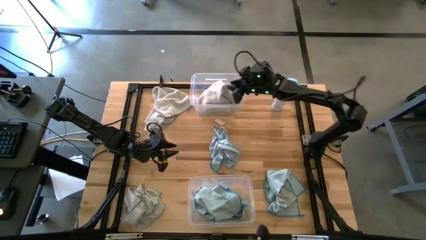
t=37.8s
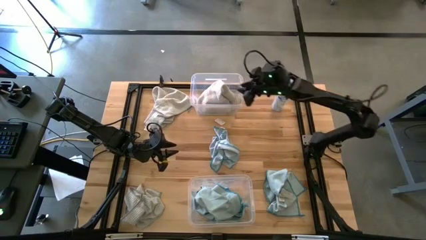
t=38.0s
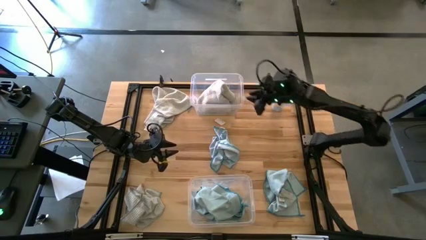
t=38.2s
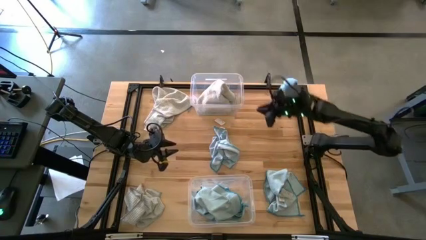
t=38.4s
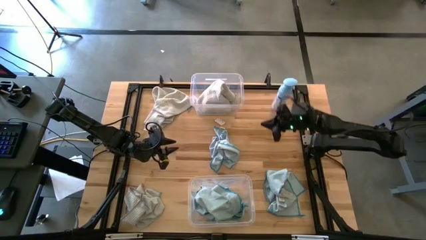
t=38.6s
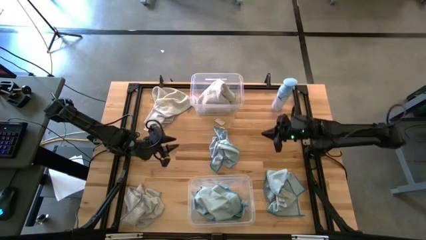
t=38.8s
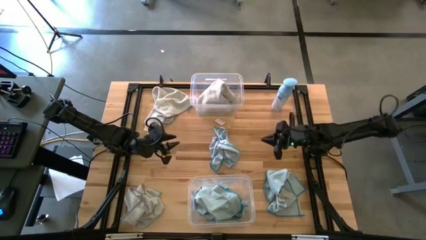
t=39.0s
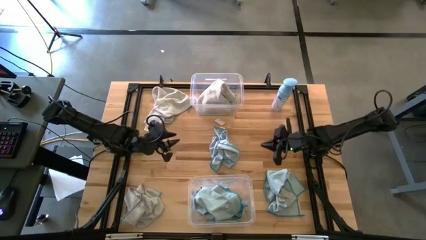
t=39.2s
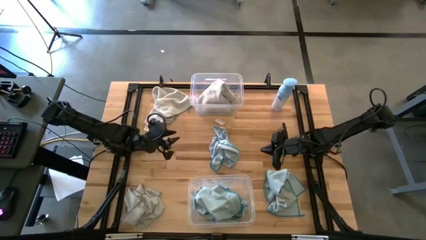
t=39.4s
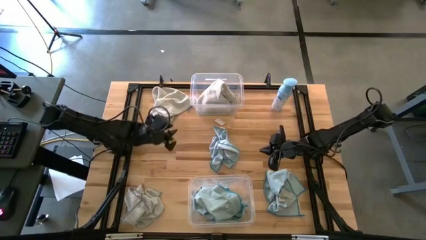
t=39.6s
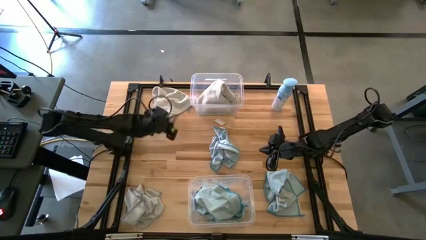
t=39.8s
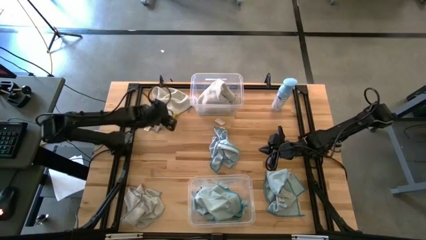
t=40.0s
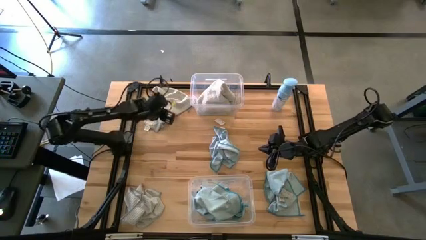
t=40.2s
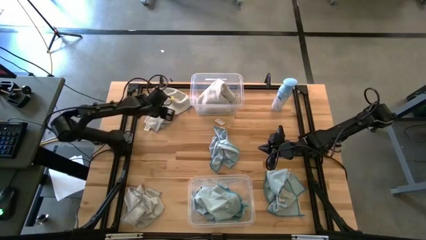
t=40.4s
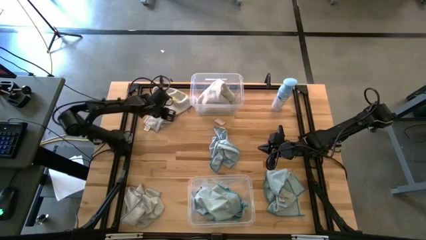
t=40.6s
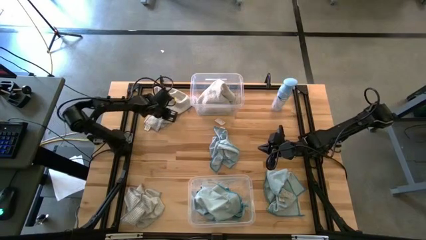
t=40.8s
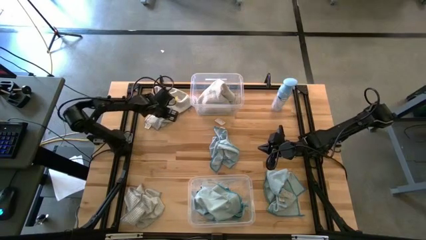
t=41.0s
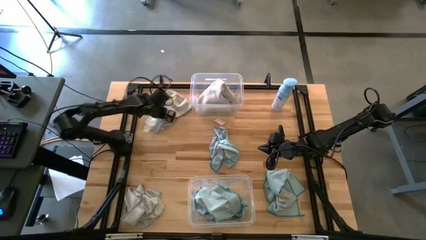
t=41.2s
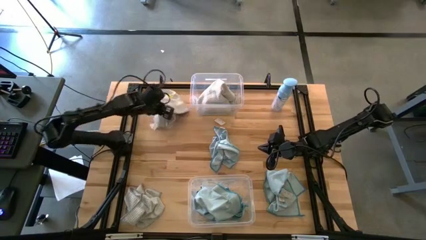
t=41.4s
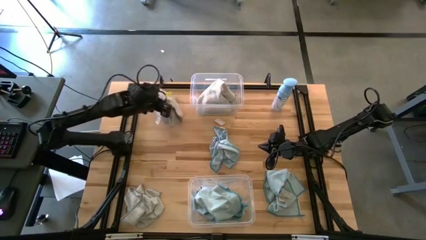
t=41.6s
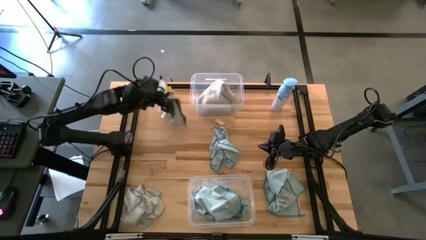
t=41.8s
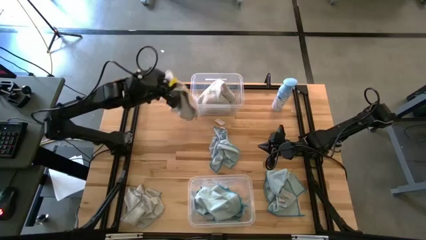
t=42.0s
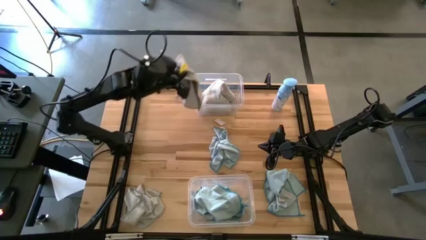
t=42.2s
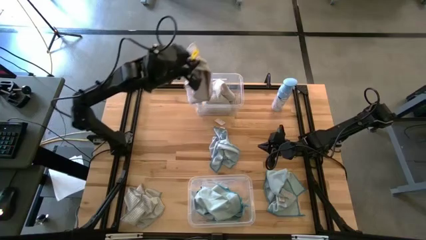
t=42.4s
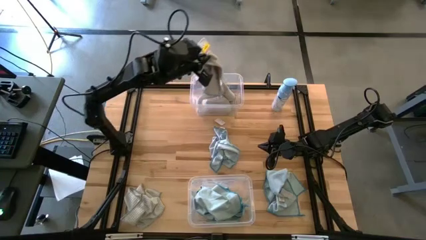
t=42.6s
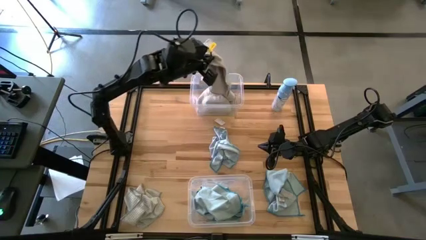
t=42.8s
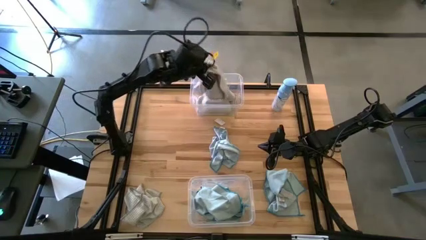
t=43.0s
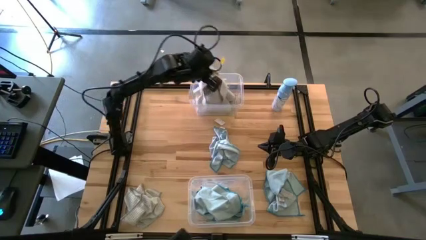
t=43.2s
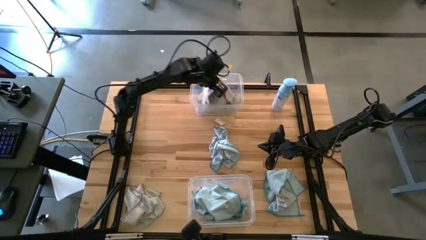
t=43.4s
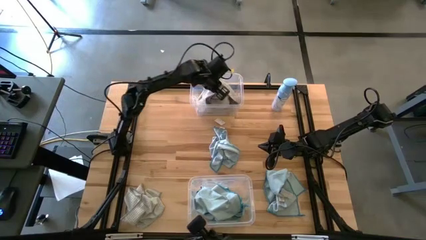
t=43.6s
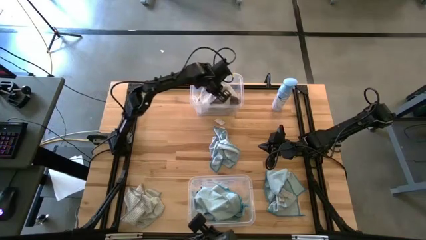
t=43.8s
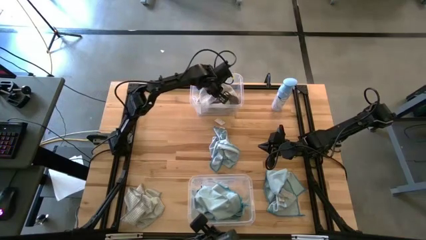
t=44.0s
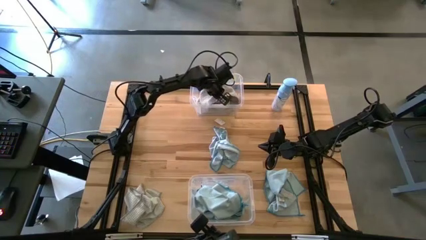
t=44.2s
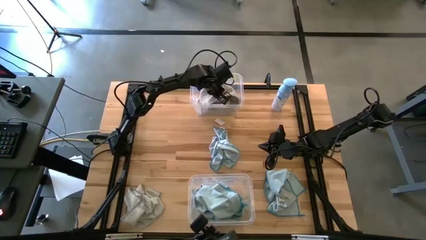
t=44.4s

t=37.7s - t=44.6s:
Task: Sort microfiber towel by color & place in baskets
Put the top white towel into the top transparent bin

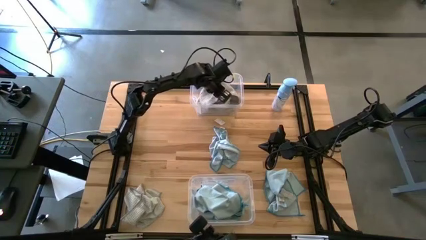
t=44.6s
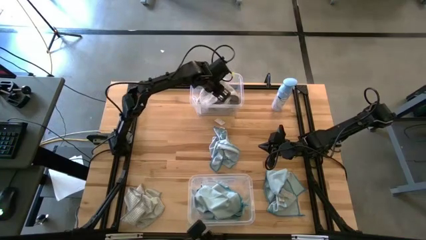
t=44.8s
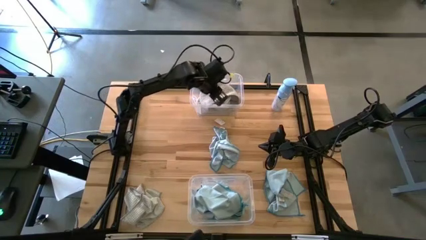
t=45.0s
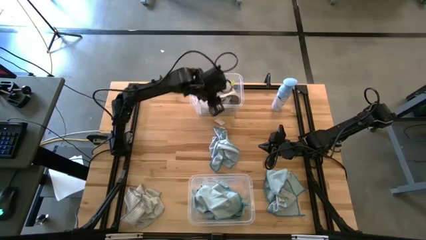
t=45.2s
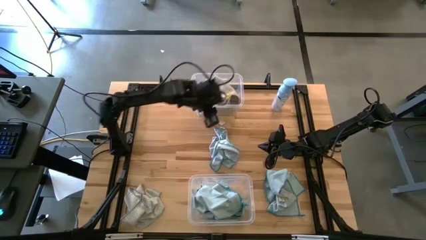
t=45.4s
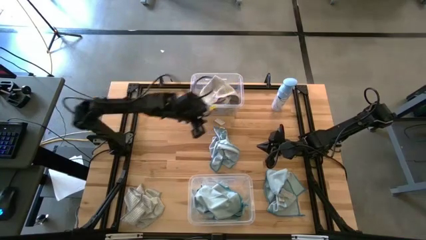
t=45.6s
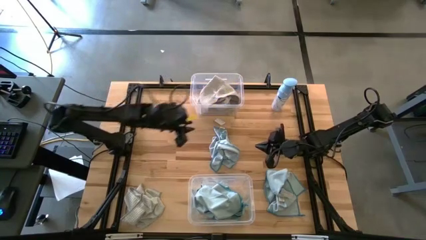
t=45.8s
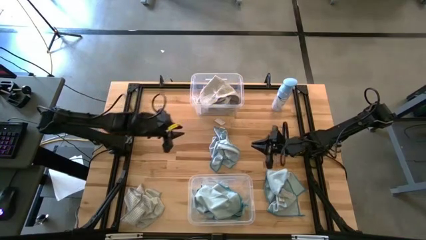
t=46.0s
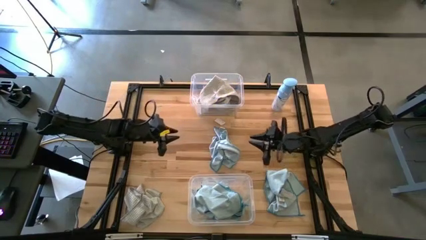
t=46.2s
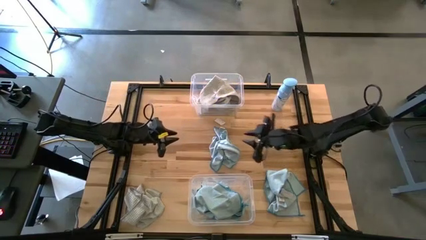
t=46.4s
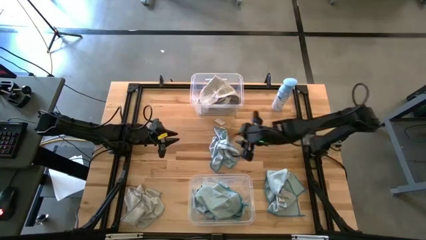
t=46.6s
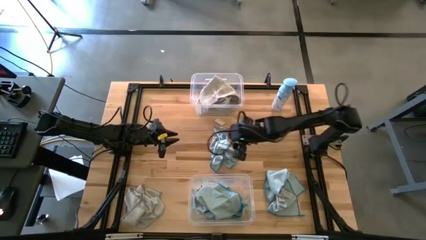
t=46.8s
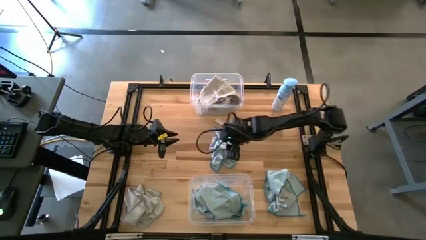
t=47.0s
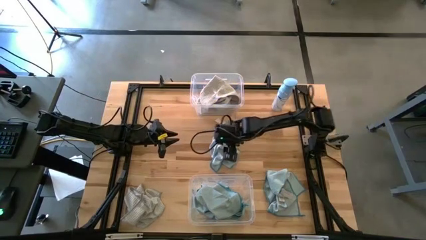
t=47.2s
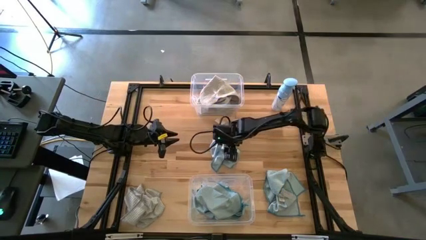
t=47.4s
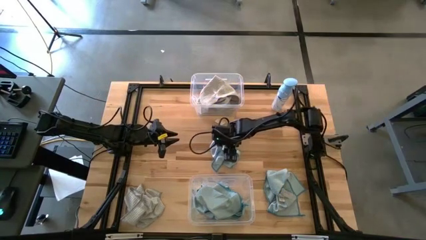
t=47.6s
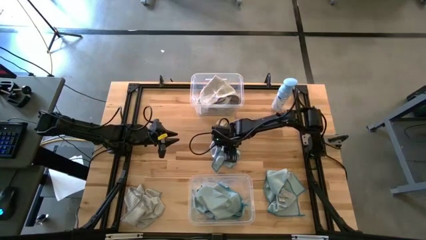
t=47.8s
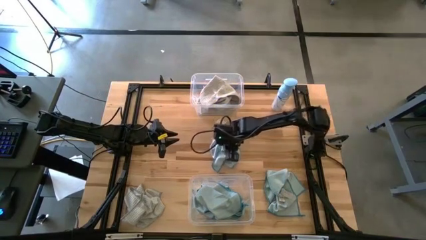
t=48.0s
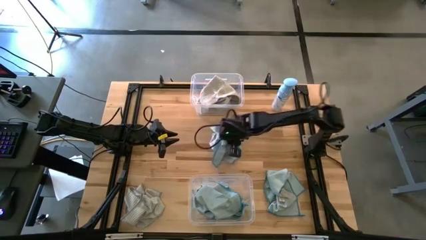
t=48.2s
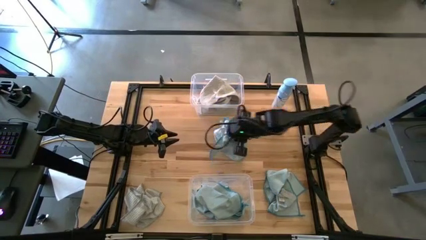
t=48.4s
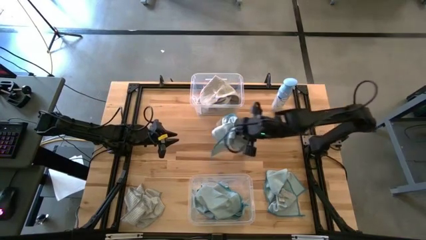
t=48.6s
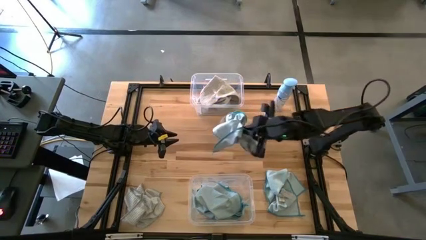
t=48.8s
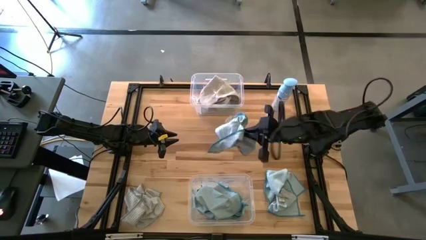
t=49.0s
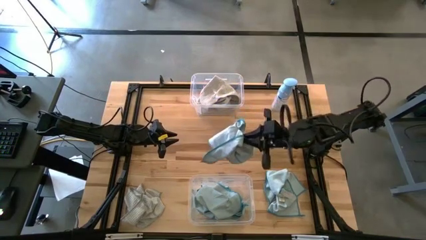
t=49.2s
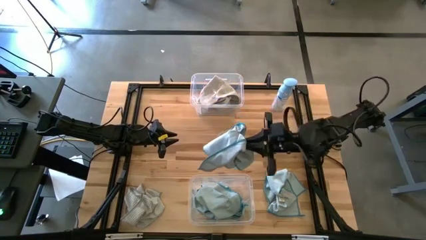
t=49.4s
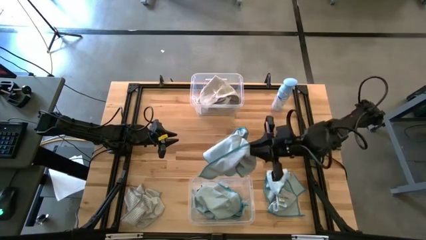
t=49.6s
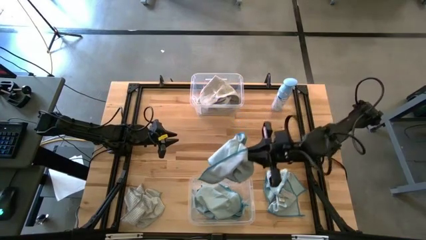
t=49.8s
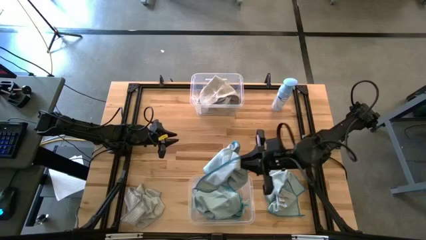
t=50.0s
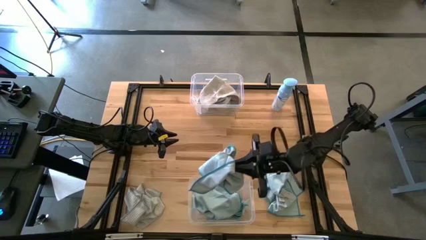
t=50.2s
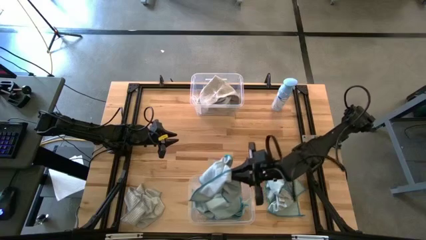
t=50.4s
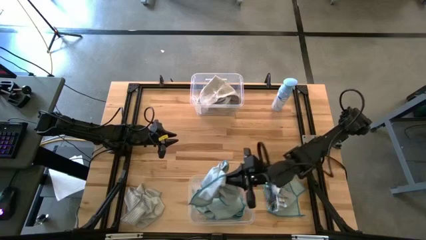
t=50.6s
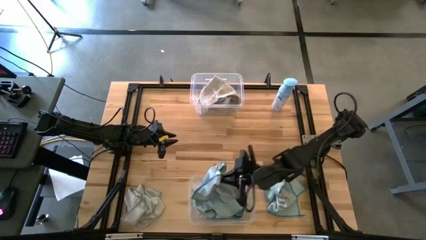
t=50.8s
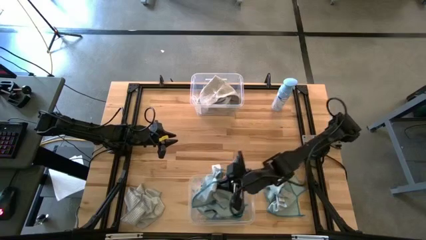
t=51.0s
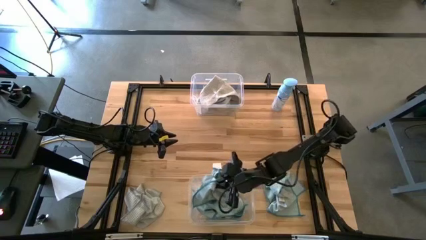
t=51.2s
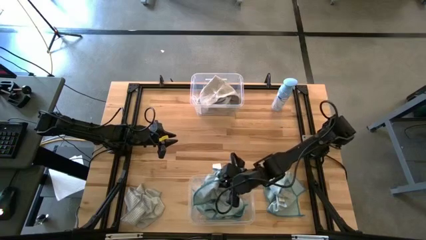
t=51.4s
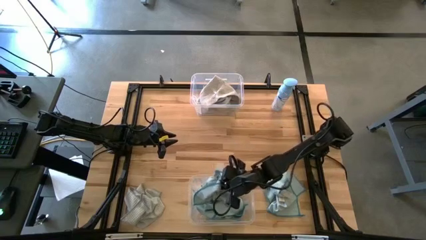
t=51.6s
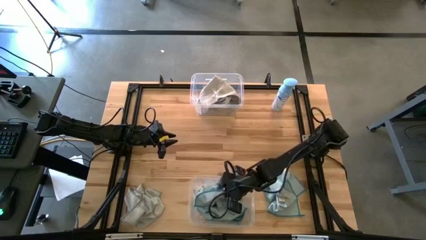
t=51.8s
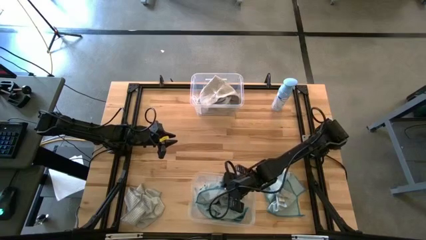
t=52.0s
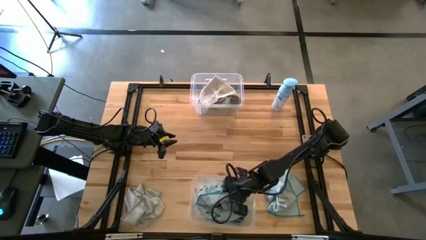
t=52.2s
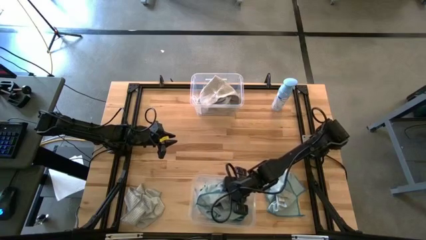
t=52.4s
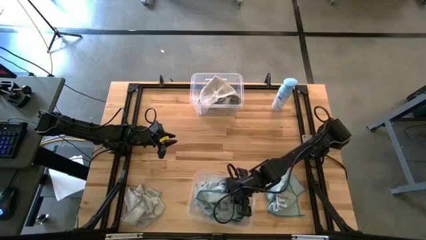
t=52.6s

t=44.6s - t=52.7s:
Put the top blue towel into the bottom transparent bin

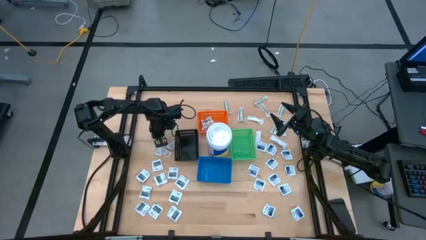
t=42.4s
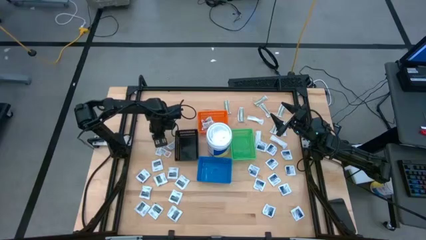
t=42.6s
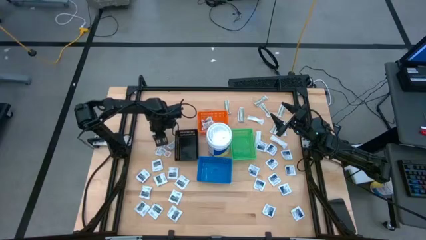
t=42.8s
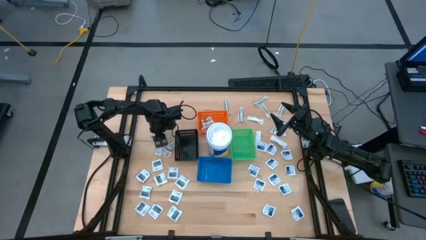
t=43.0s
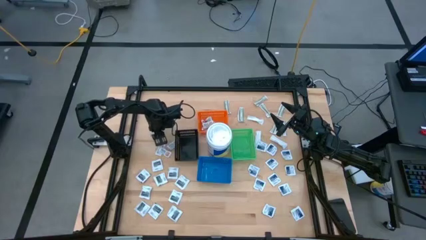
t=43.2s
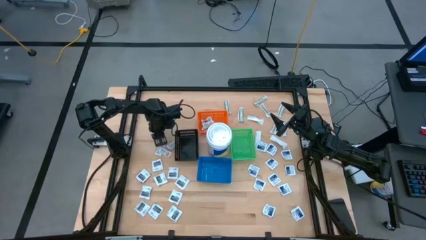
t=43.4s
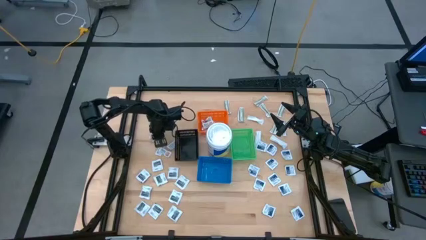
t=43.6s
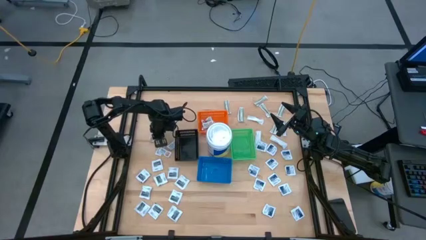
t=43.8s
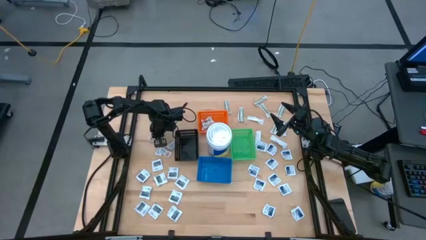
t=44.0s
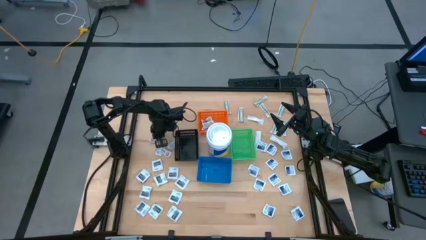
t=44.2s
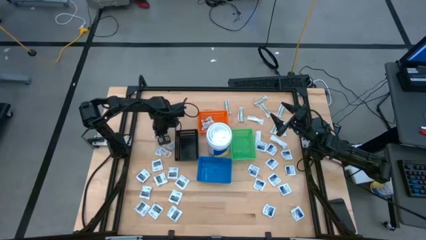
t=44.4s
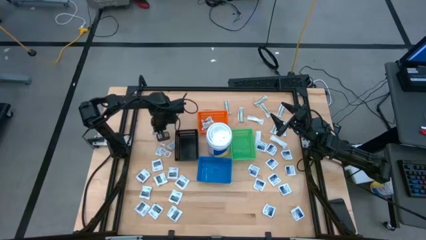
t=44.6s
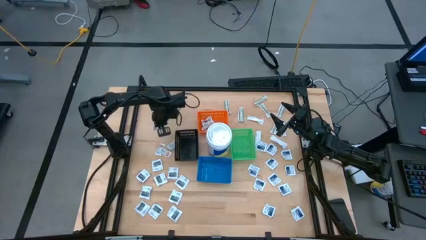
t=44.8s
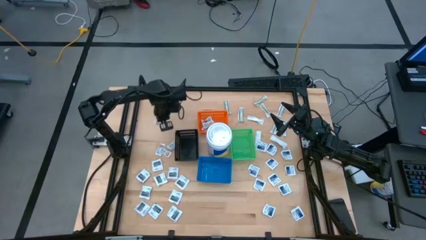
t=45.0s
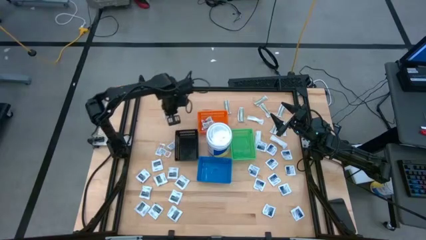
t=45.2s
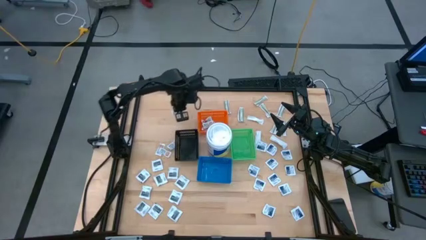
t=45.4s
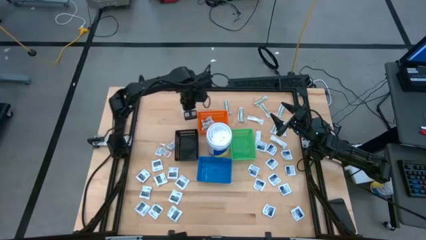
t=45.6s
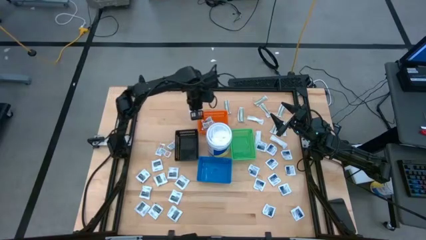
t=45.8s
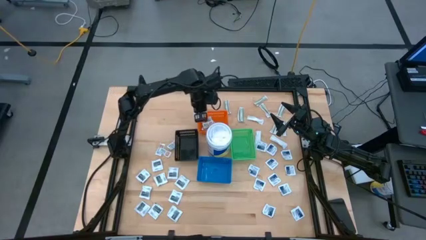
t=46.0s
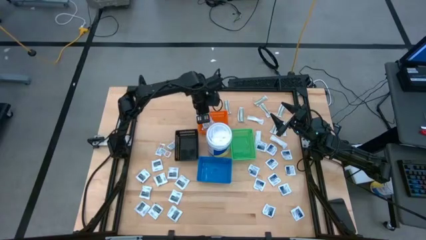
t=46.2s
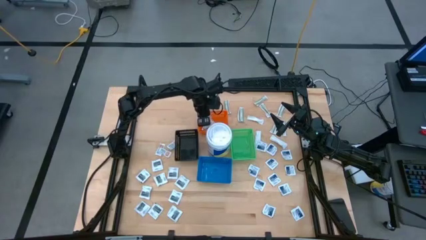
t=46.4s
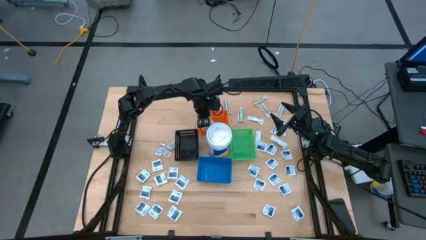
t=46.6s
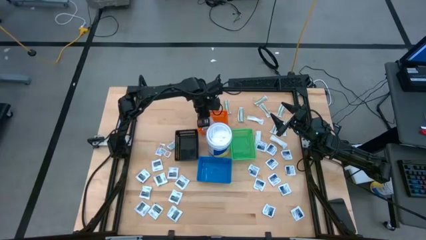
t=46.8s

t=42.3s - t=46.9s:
Task: Pick & Place First Aid Supplies
Put the orange ointment pack into the orange bin
